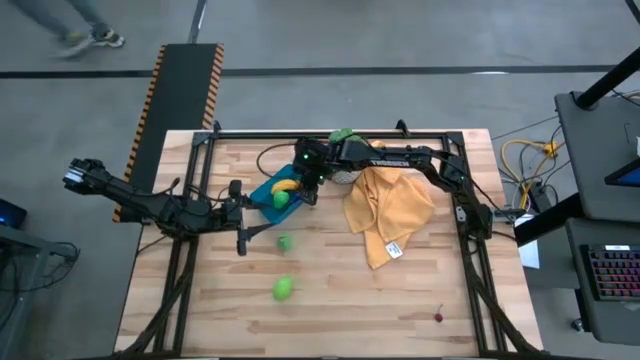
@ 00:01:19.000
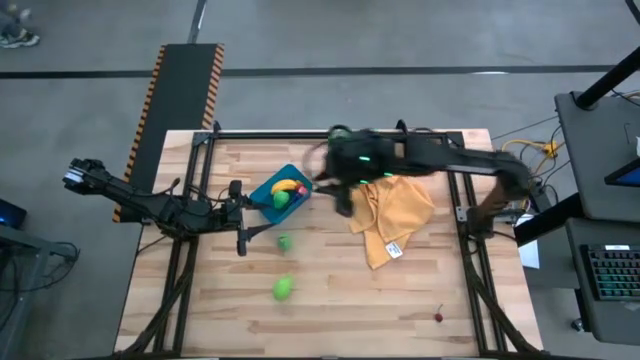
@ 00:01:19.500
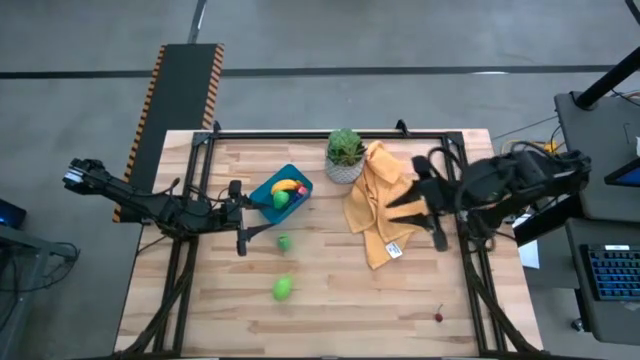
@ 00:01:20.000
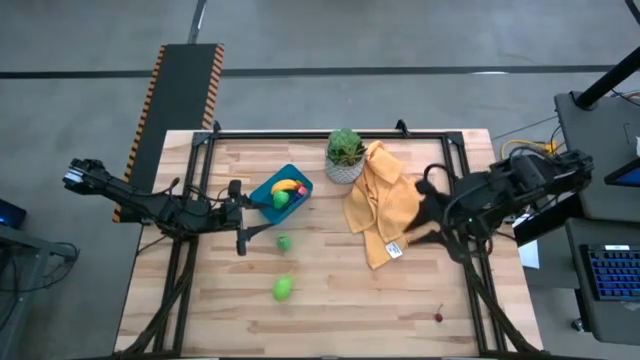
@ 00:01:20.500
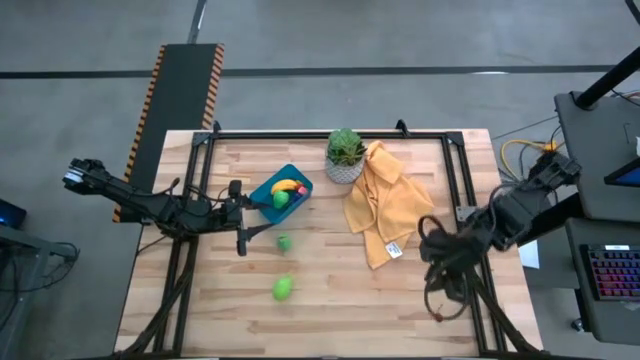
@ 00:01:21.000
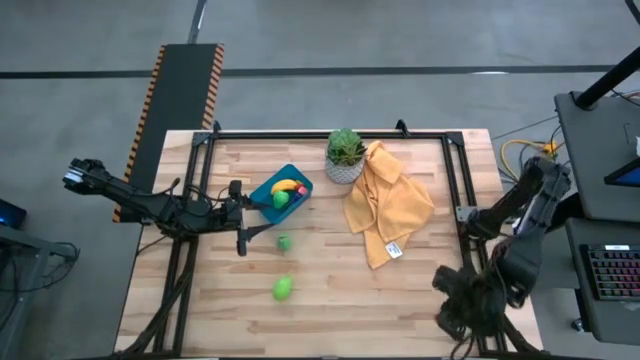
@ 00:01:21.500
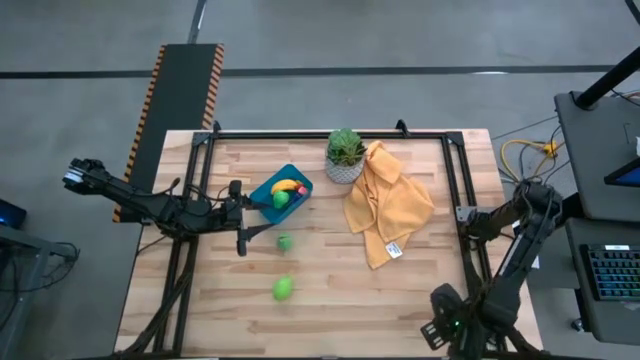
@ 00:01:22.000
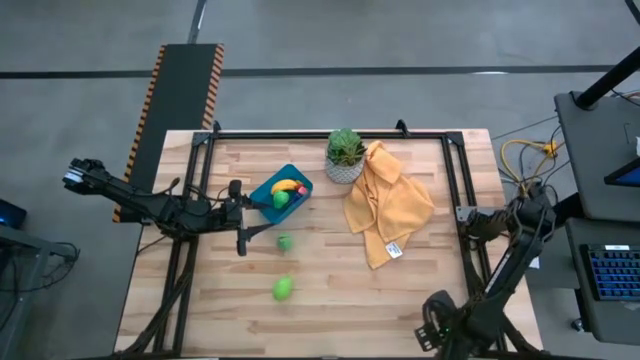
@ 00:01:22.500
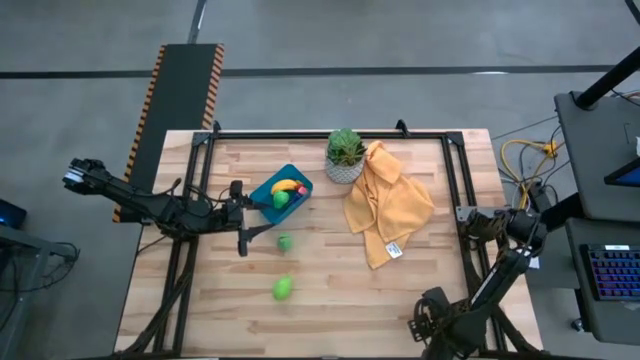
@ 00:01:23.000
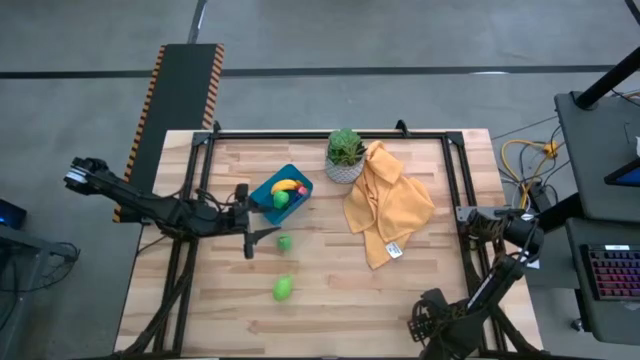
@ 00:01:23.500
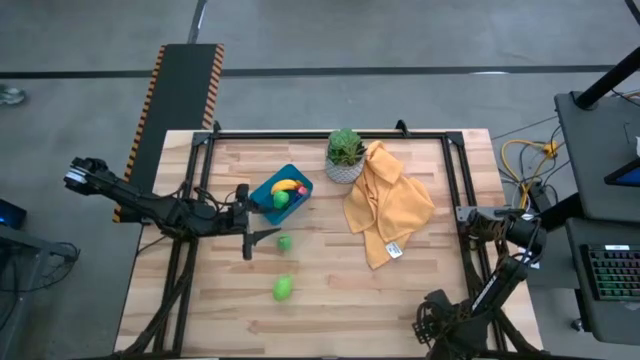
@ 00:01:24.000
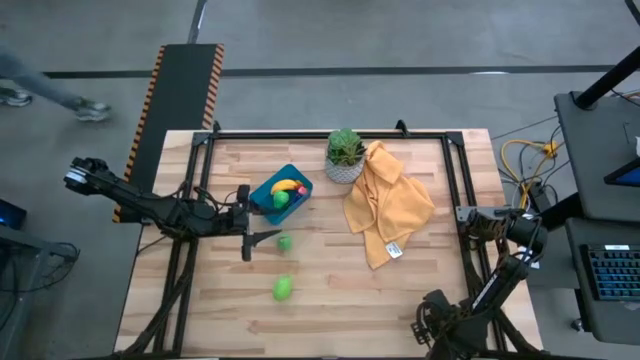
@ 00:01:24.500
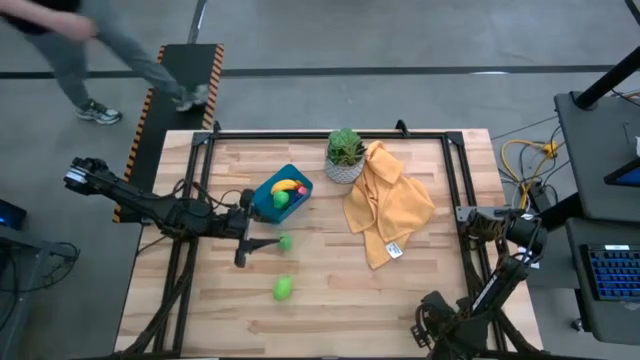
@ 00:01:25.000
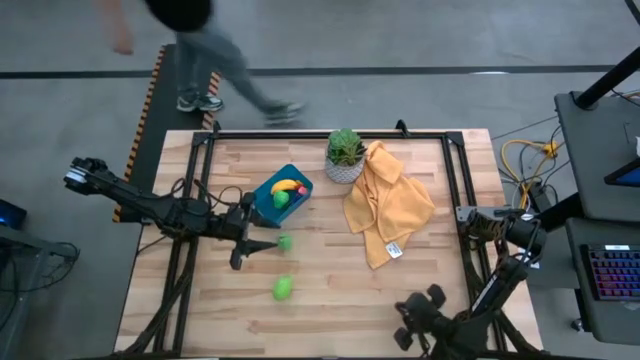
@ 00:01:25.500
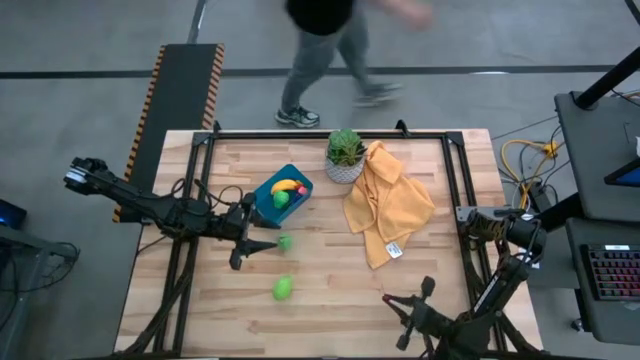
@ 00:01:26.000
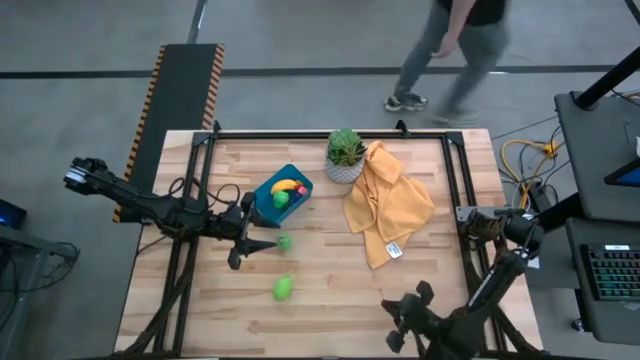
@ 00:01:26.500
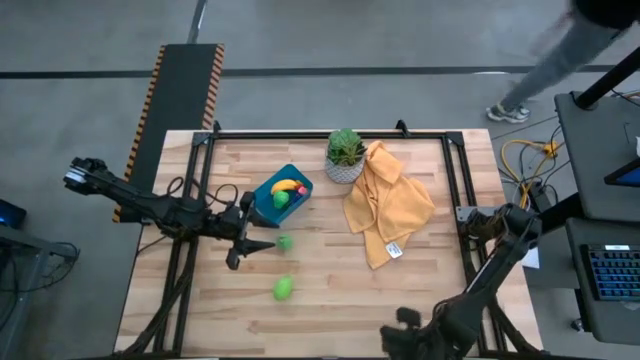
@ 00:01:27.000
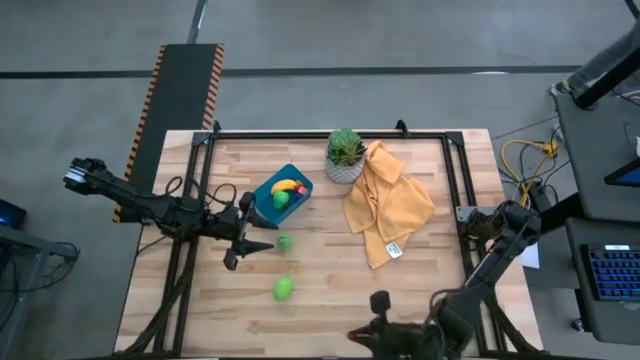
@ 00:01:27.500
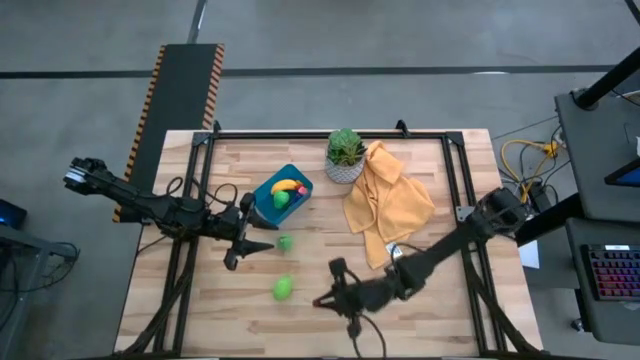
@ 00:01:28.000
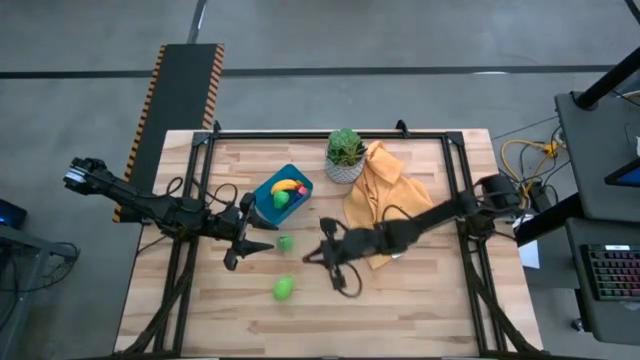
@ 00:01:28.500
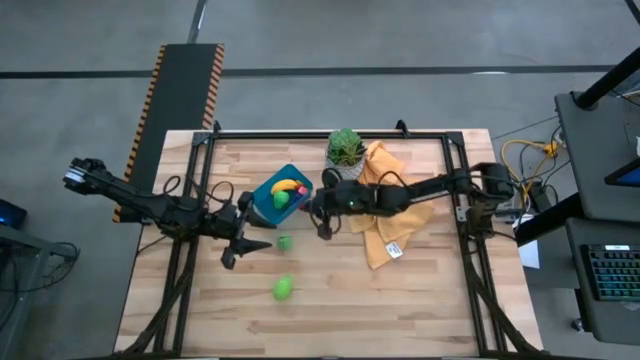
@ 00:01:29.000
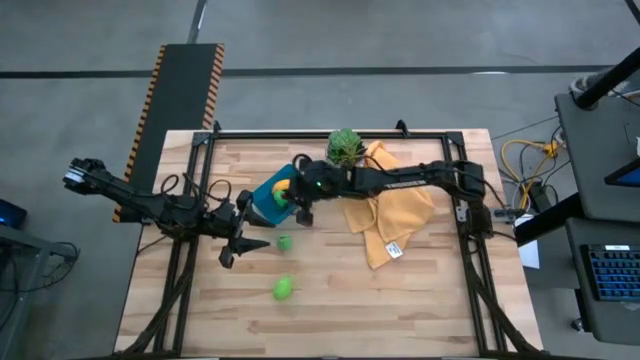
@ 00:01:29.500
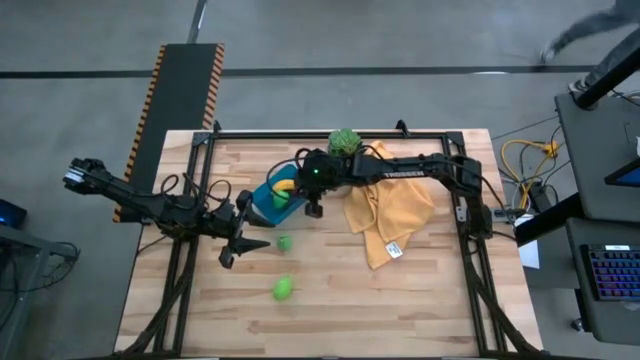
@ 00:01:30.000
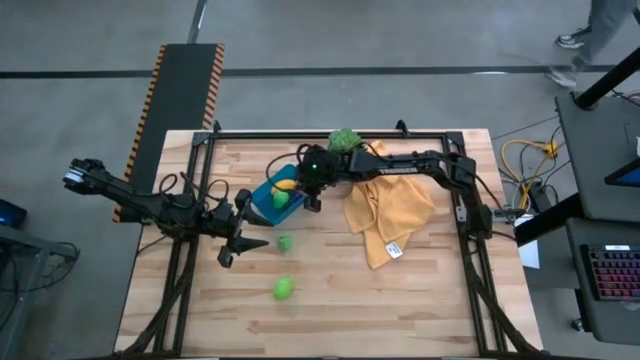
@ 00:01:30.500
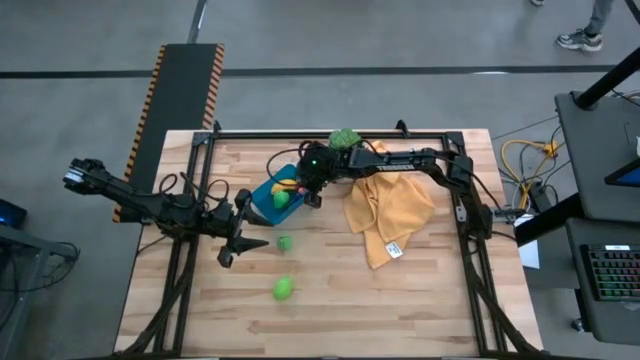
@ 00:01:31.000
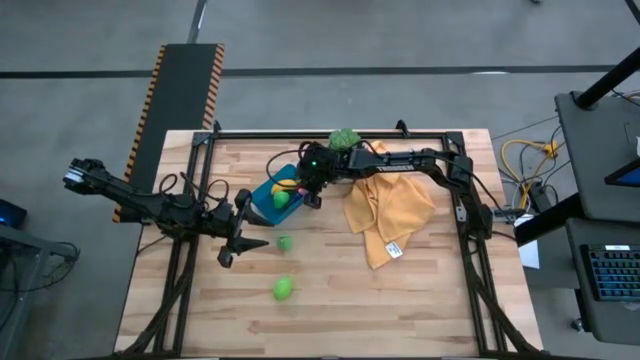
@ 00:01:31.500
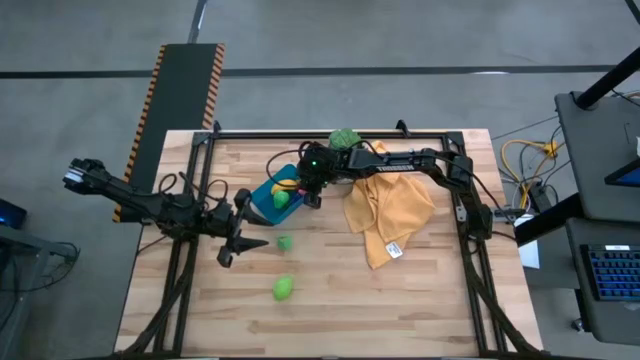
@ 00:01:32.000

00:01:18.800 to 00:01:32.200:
Task: Pick and placing Produce into tupperware
Put the red cherry into the blue bin
